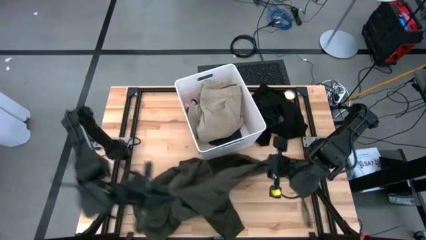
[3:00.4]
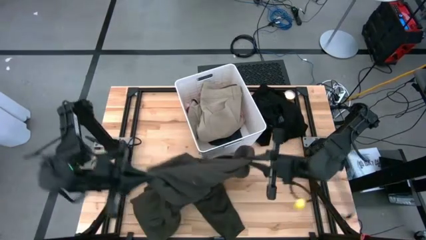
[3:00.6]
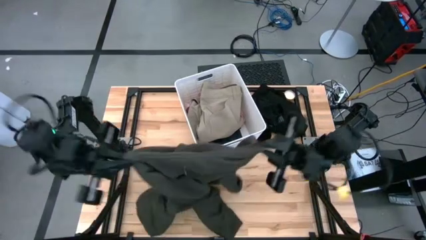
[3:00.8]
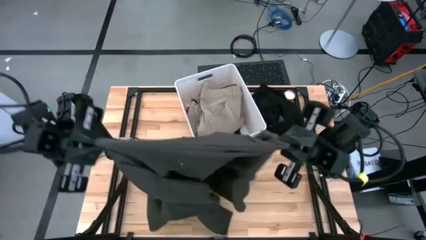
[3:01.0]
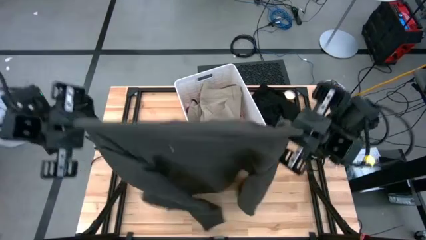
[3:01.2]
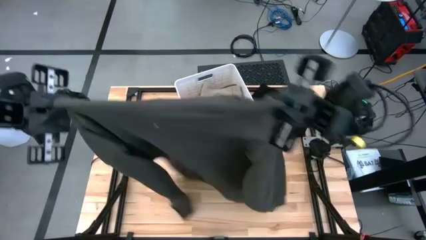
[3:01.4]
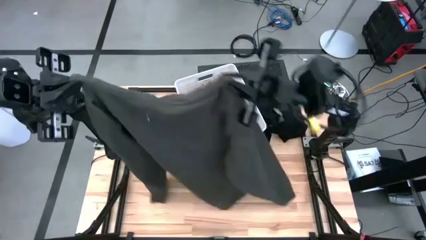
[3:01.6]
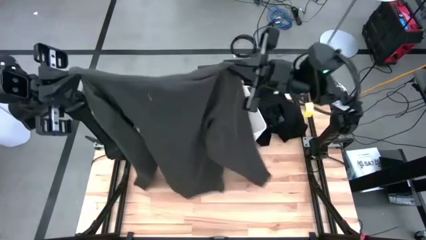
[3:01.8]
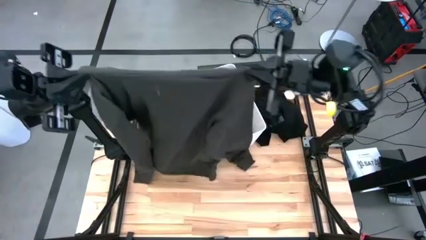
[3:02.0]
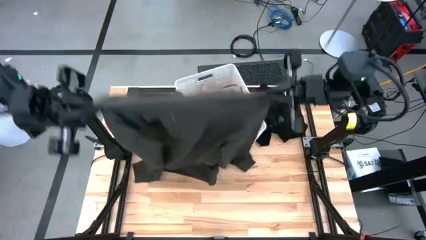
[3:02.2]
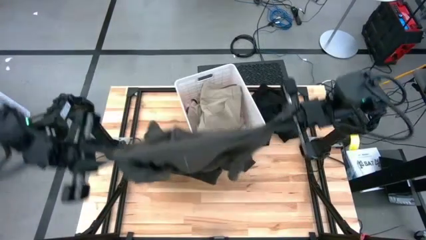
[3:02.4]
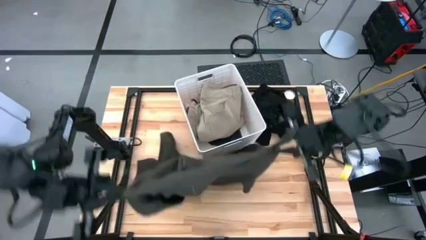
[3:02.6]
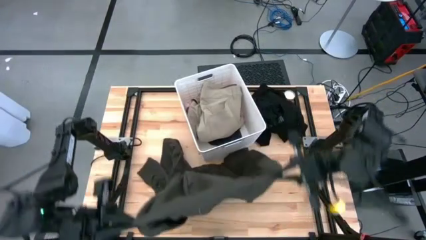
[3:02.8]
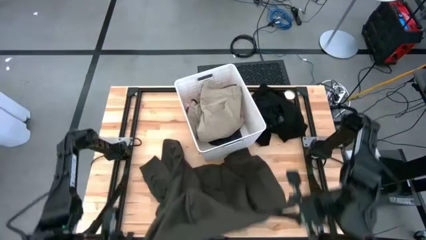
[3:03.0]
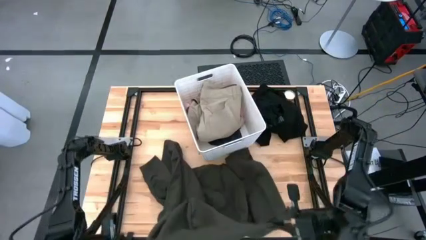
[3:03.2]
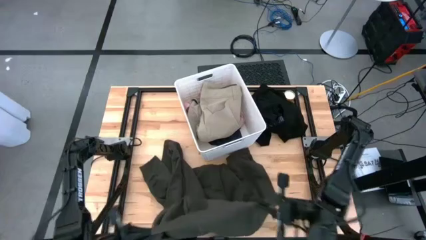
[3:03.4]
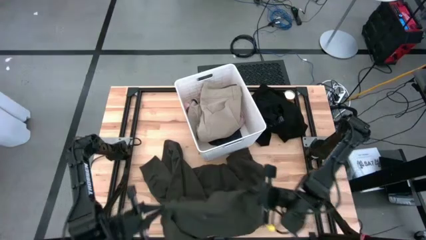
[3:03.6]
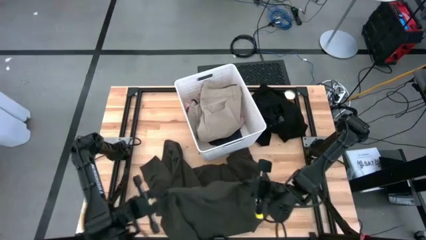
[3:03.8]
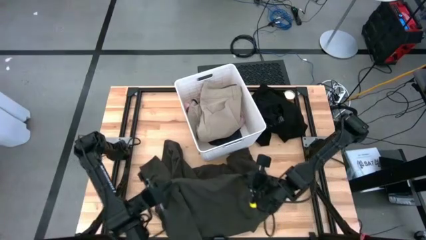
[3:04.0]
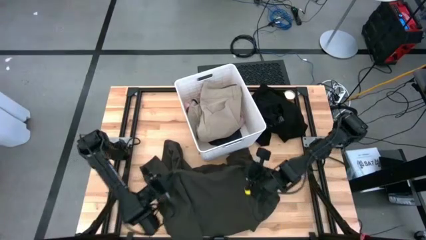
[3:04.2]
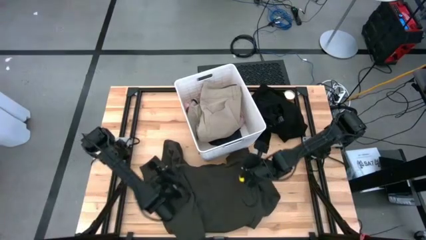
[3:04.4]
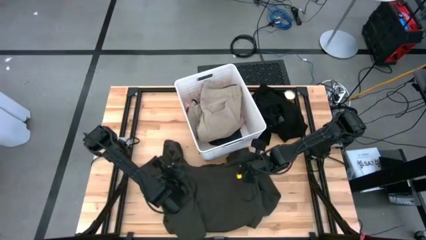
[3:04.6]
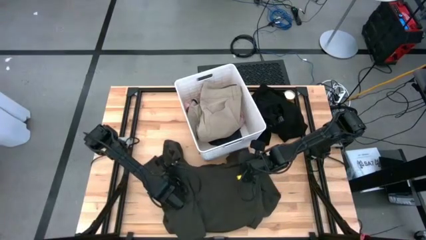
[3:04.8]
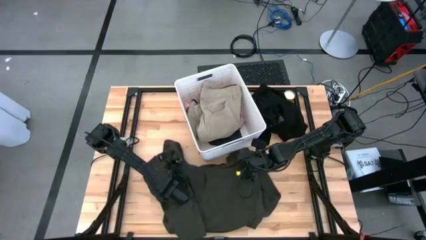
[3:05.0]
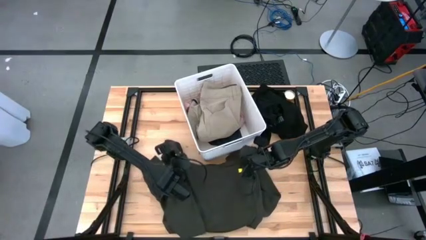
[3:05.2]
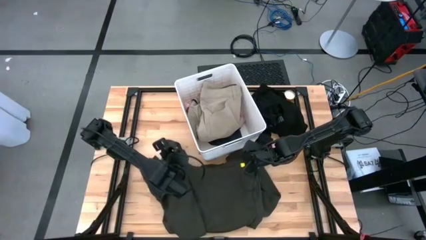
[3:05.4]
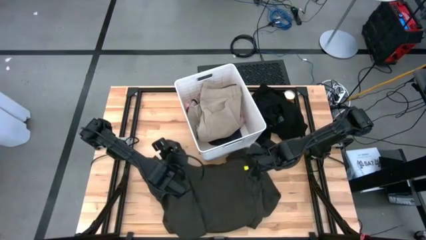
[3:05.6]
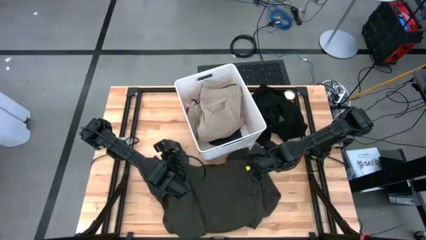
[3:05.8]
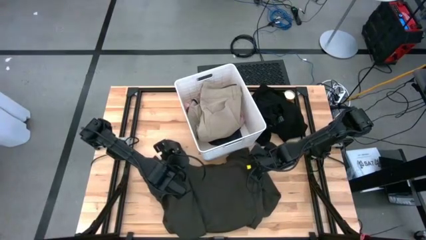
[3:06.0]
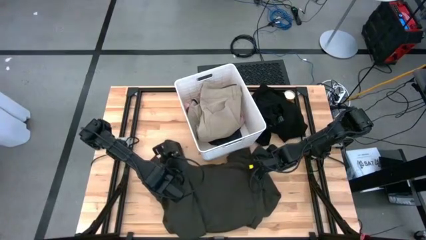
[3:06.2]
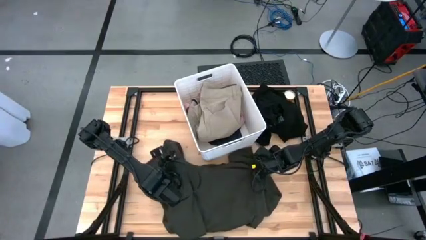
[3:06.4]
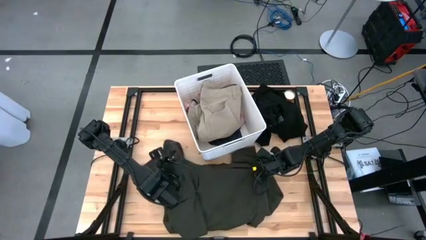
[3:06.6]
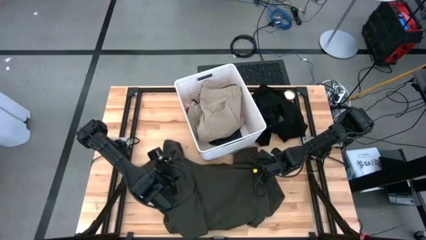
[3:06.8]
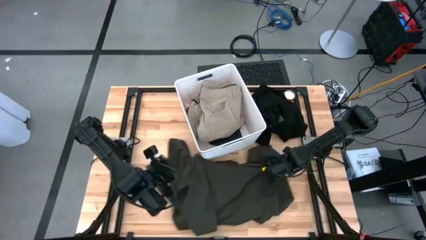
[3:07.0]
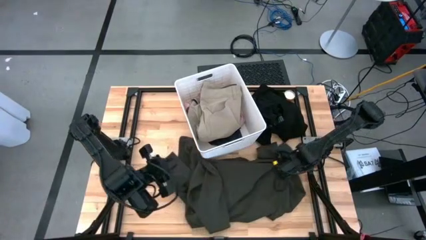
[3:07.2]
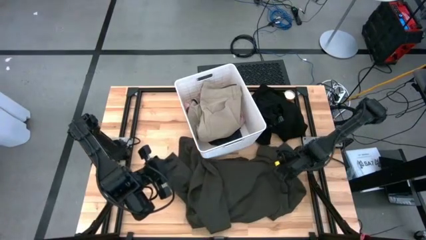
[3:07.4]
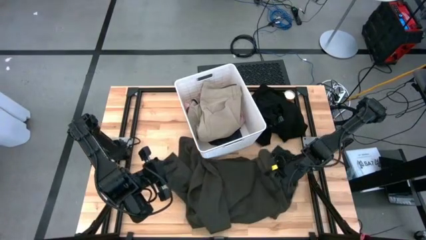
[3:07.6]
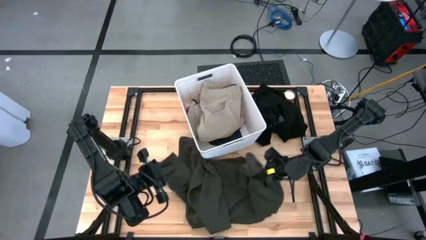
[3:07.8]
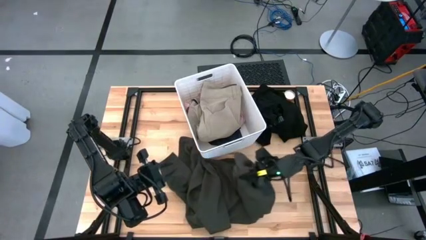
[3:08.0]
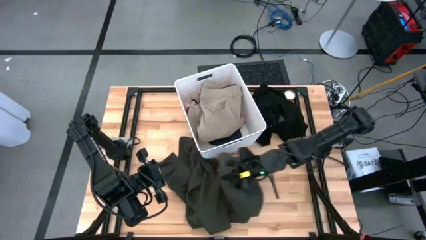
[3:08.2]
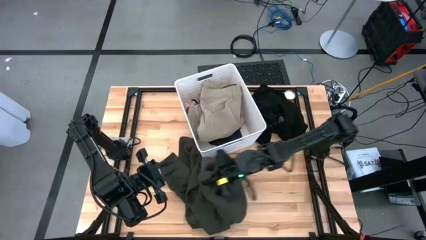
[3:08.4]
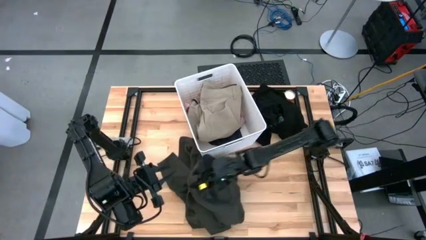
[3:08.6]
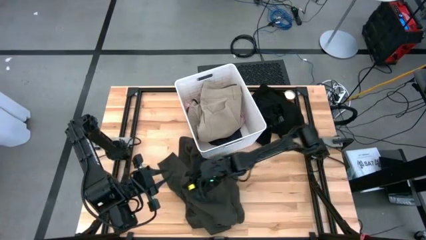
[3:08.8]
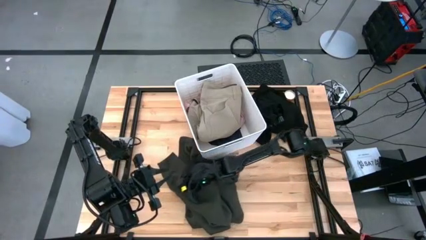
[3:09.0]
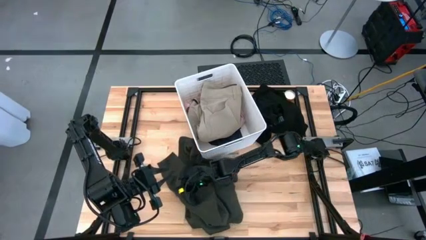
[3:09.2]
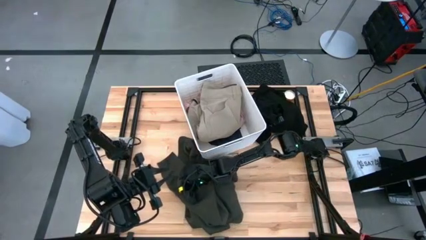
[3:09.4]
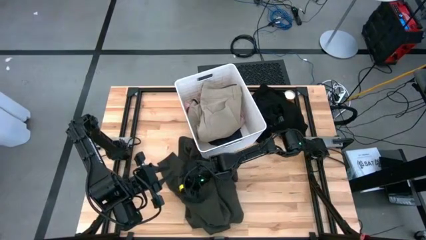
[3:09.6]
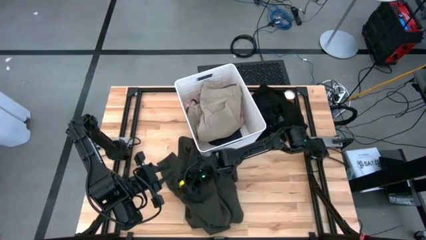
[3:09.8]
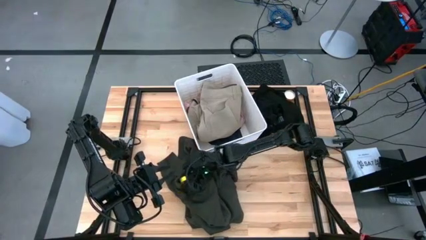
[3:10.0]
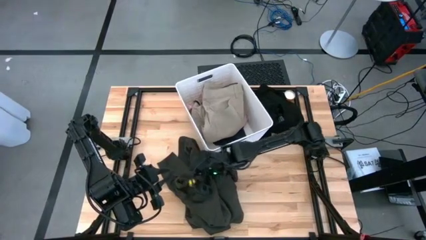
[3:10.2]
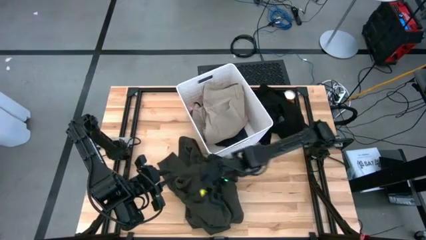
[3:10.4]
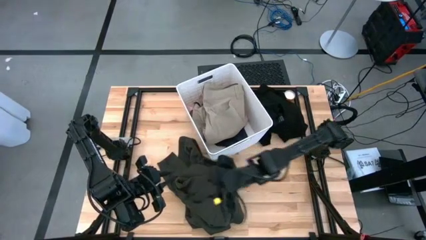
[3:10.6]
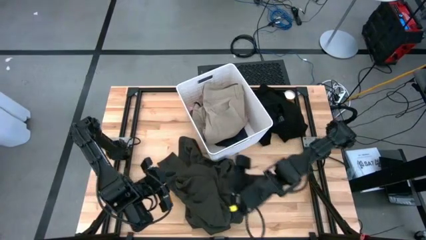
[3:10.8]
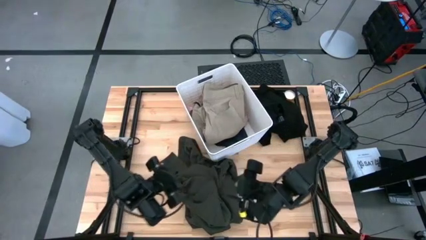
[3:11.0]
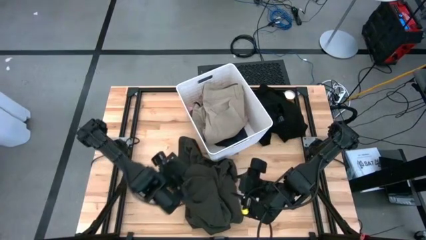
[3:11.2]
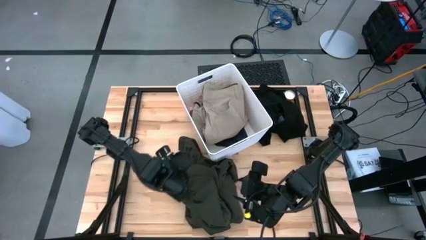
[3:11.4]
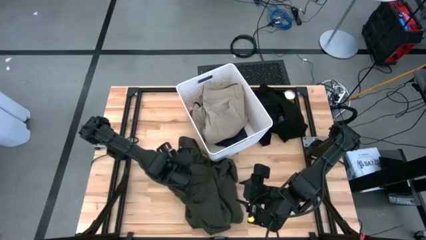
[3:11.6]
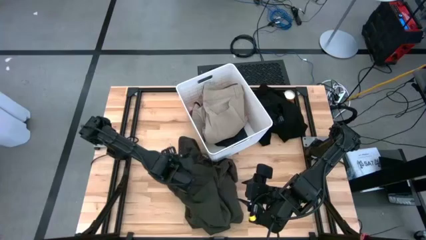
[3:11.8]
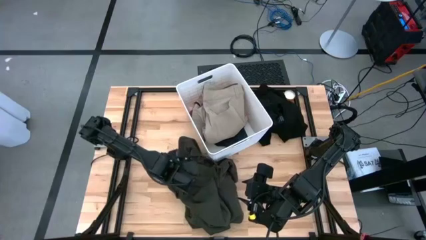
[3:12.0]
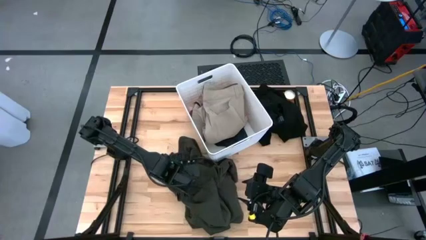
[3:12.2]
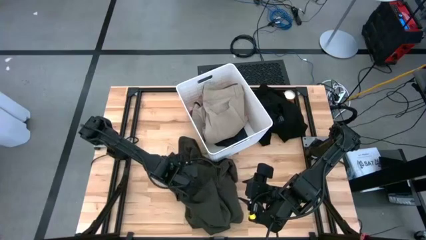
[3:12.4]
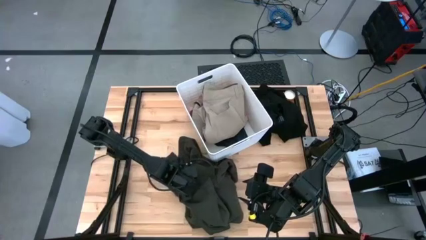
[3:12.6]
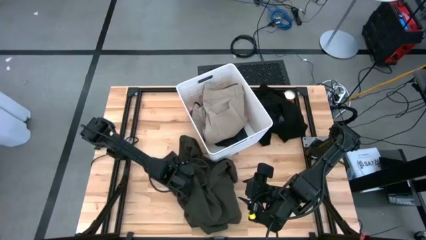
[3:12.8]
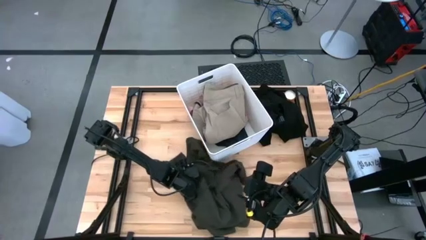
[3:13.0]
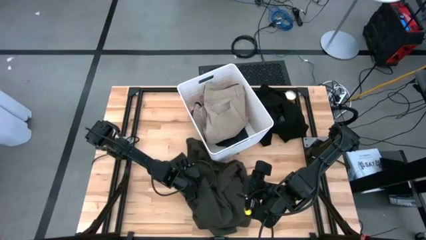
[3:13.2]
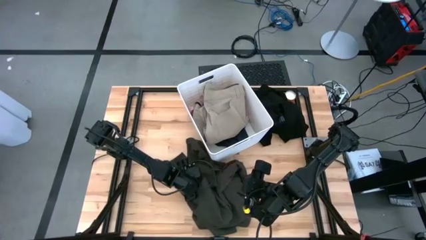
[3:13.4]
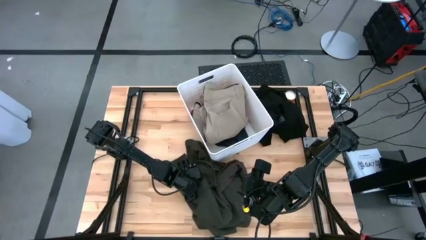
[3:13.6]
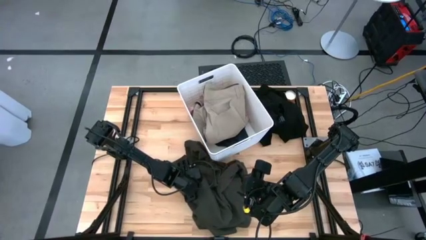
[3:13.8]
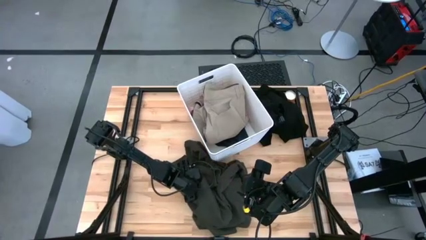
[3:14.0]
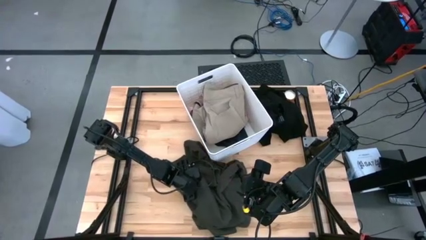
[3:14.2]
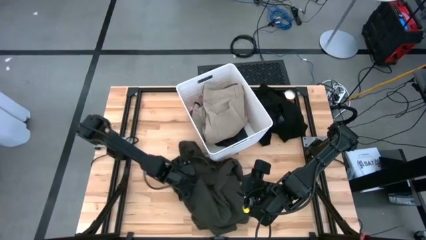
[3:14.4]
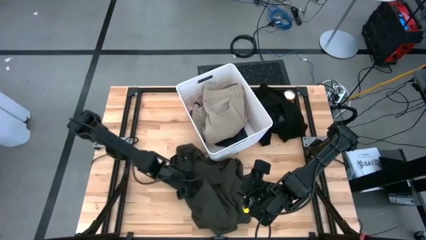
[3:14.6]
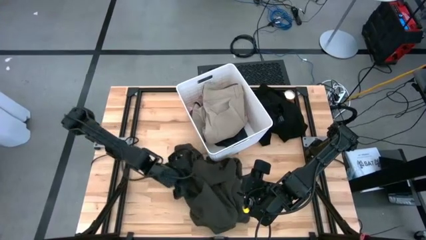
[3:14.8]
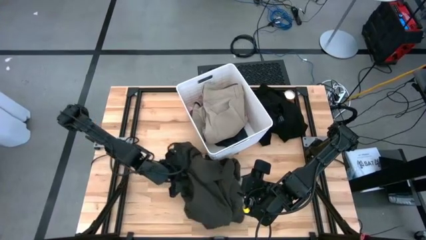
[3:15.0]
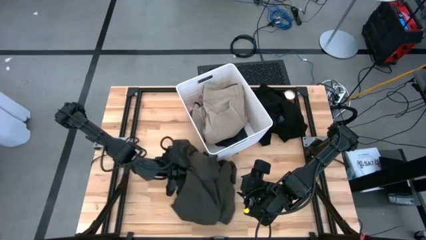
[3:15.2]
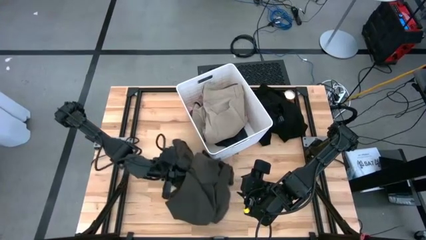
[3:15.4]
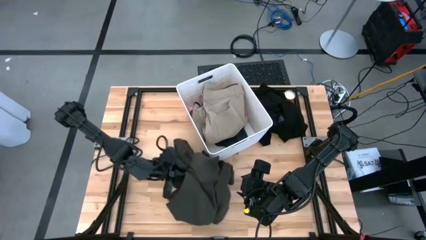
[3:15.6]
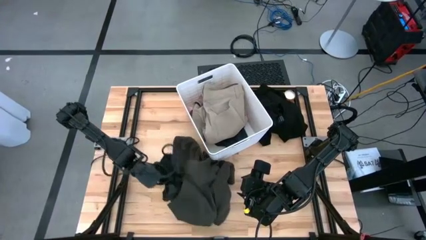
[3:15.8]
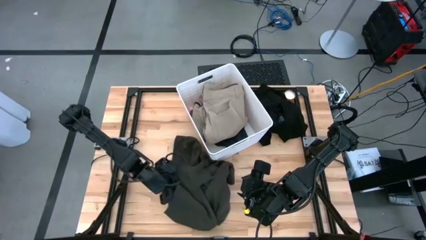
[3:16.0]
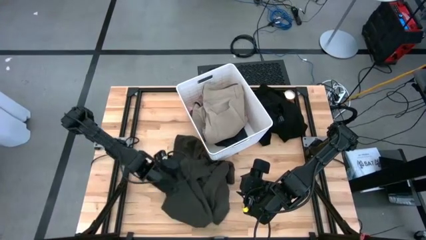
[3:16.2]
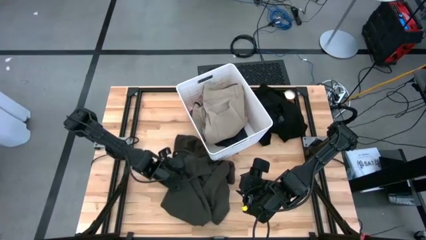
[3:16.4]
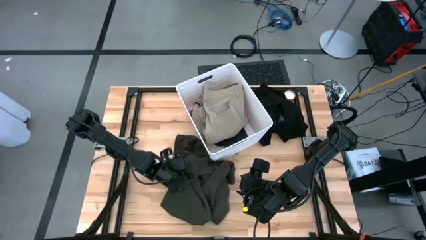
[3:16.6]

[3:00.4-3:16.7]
Task: Sort clothes
Put the folded gray jacket into the white laundry bin
